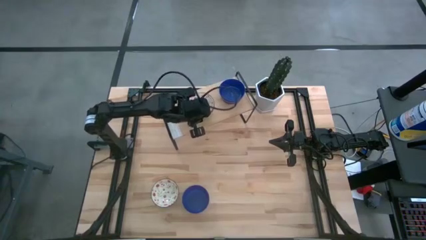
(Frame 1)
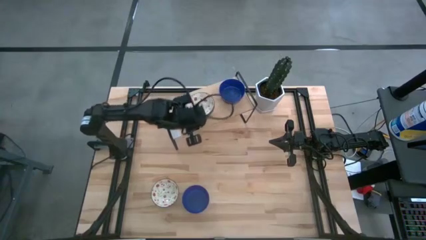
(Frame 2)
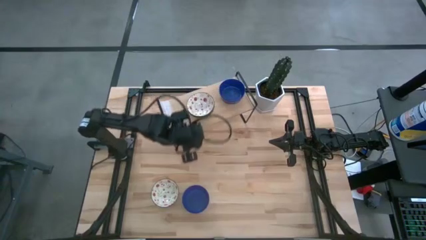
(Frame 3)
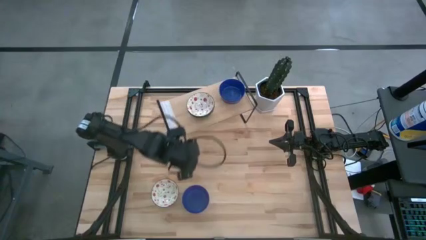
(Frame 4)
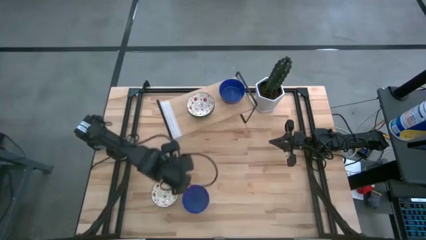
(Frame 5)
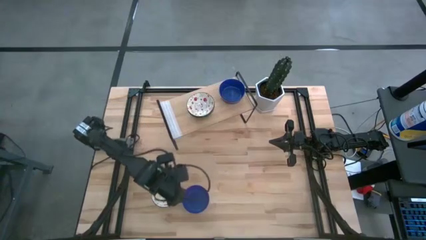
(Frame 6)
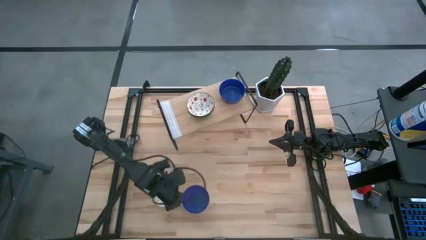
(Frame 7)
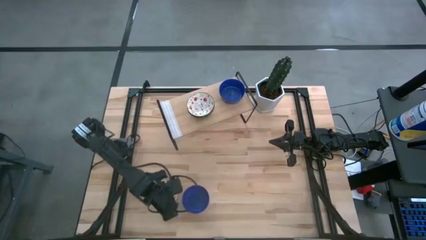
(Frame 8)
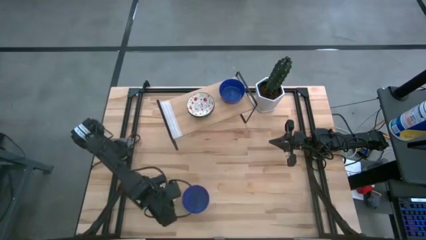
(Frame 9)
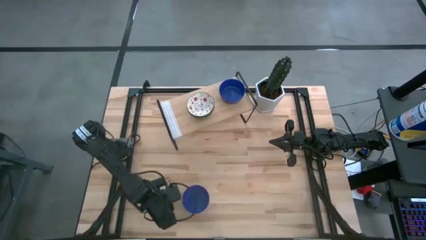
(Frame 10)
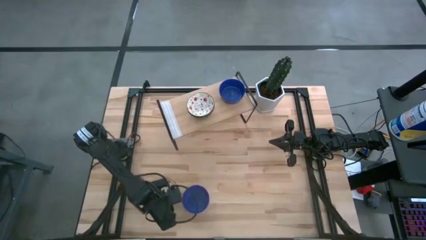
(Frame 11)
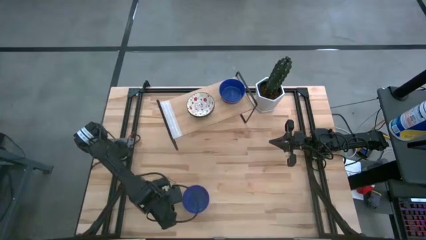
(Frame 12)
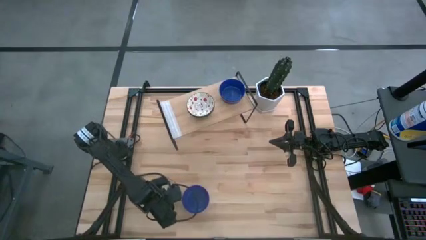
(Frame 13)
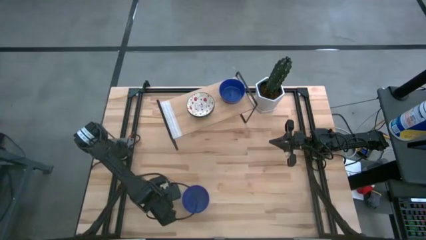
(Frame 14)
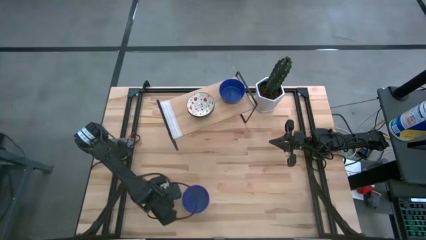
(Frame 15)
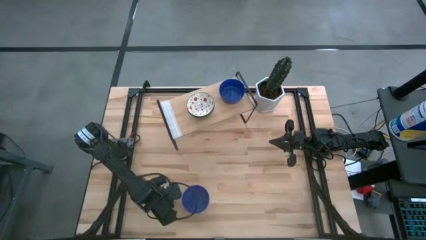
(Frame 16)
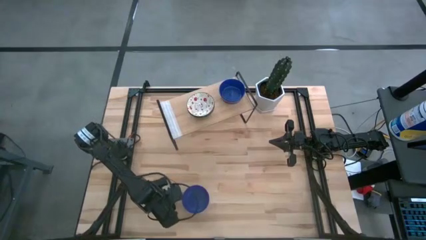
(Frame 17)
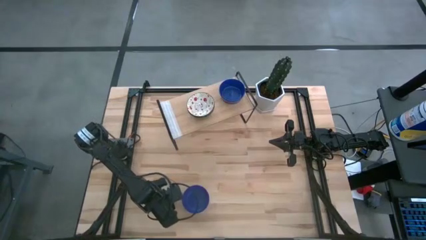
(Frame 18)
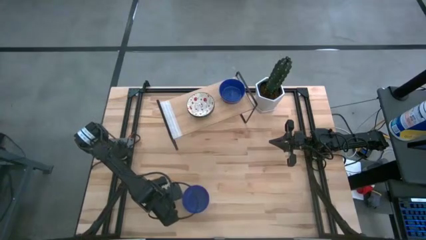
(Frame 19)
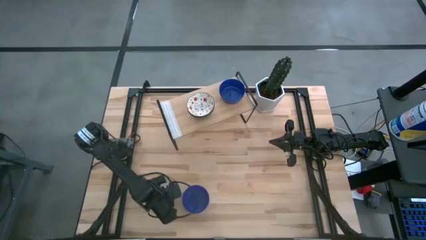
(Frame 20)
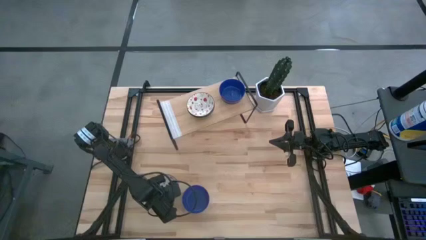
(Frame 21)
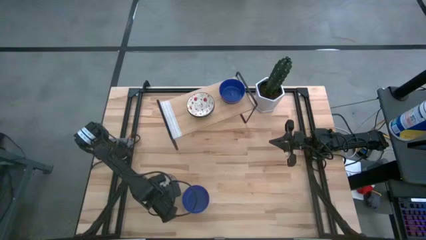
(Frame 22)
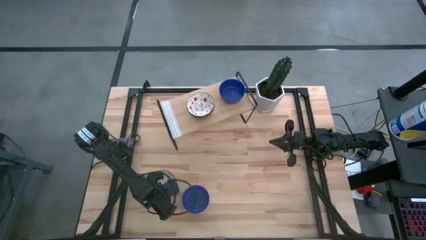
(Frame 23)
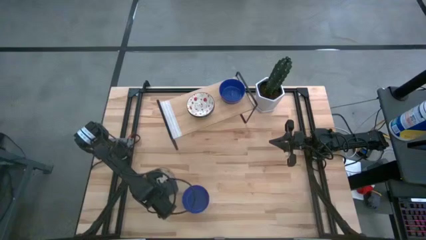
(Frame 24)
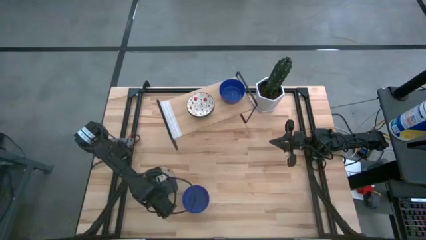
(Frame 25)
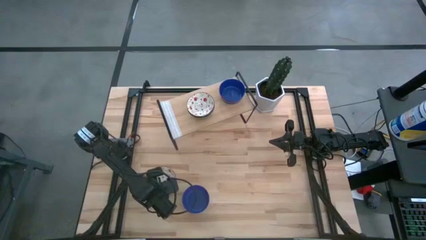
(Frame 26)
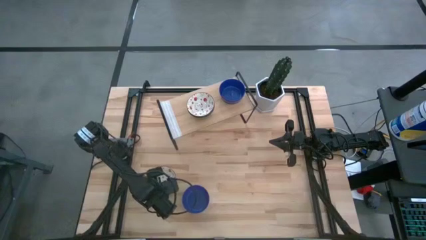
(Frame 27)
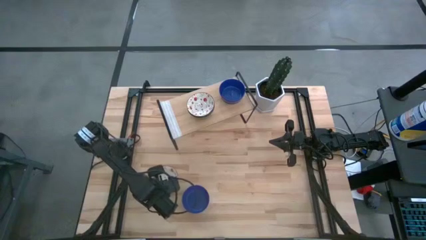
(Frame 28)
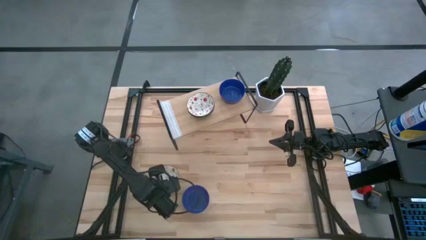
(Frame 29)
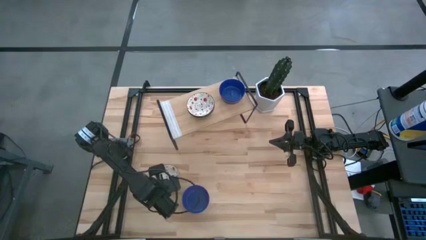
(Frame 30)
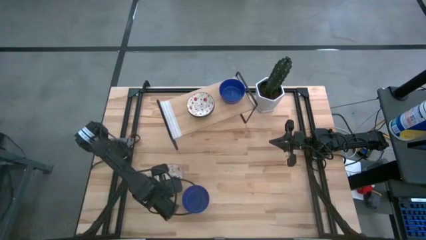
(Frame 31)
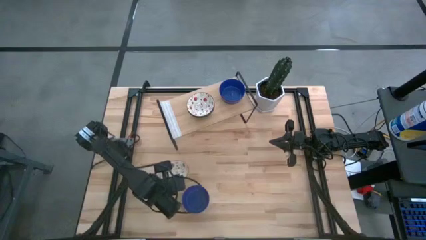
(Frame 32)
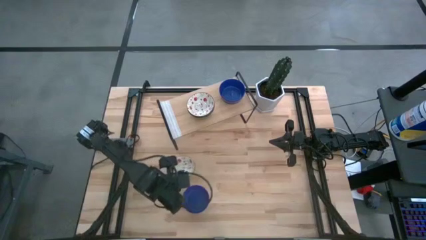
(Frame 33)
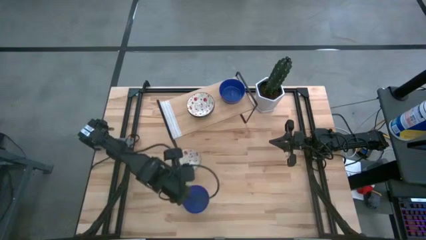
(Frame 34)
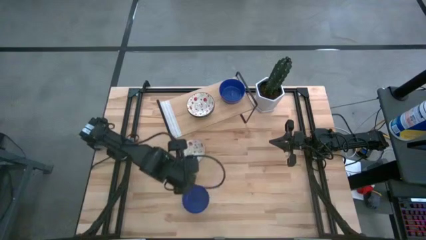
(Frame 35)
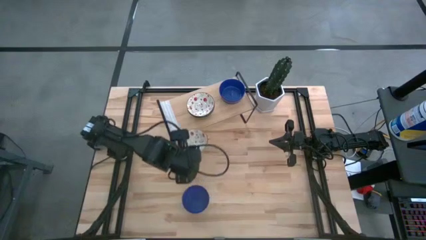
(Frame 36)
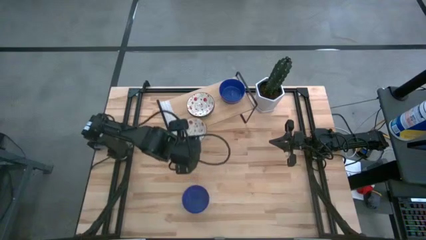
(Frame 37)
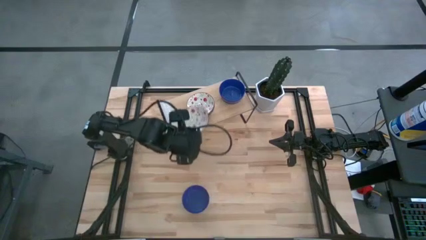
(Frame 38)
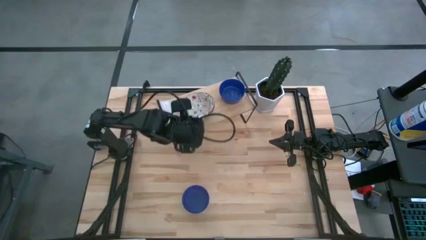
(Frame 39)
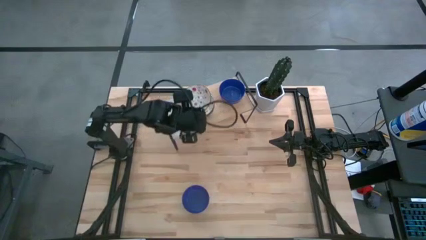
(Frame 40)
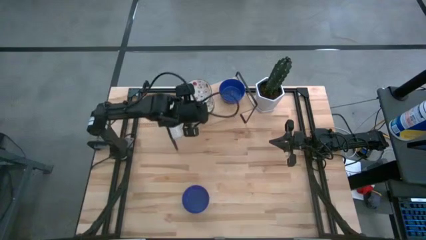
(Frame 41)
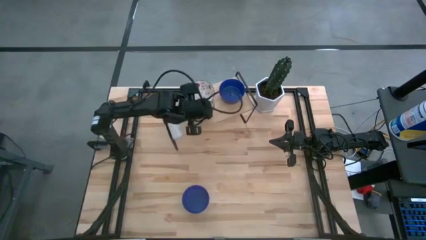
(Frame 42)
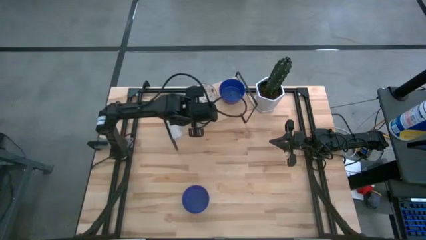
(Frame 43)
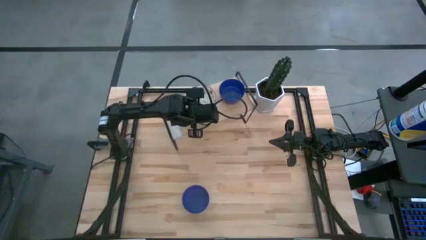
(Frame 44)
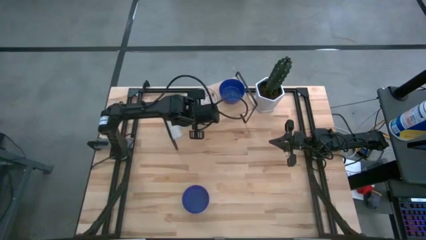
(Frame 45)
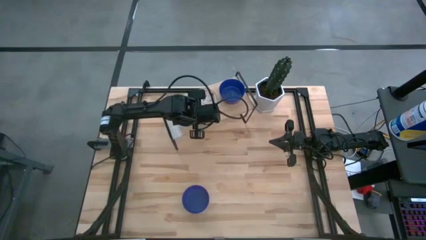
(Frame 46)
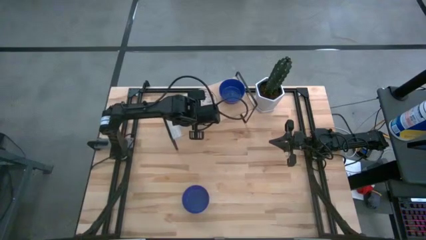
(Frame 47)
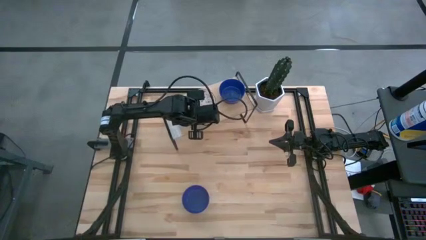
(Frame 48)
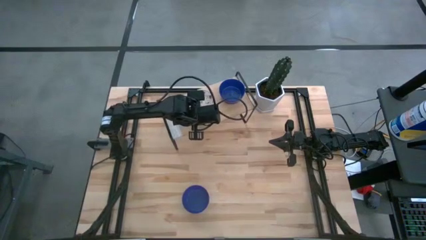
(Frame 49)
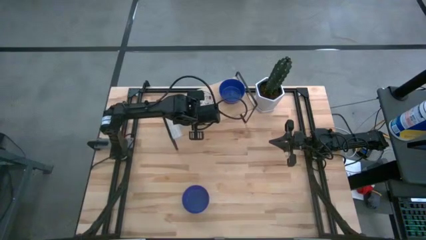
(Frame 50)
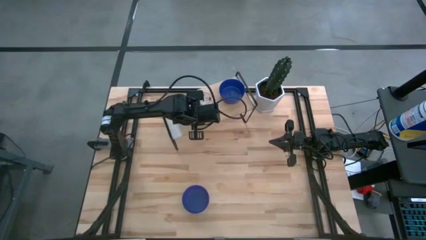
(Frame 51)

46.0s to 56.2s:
Task: Pick & Place Mini bowls
Stack the white patterned bowl on top of the white patterned bowls on the shelf

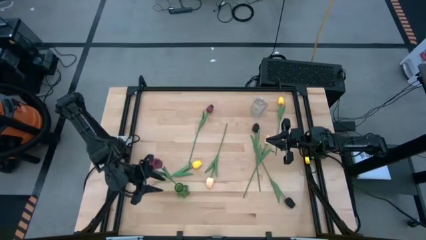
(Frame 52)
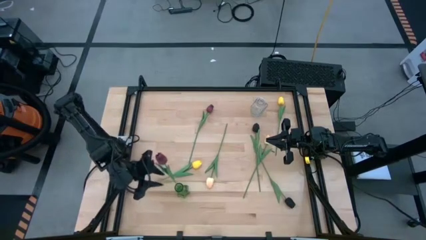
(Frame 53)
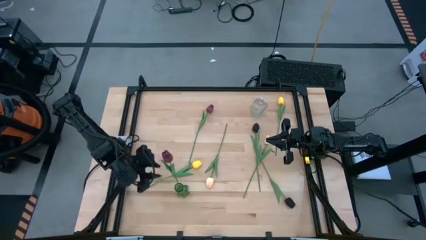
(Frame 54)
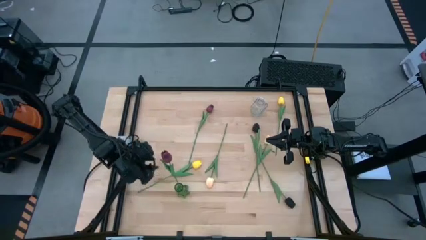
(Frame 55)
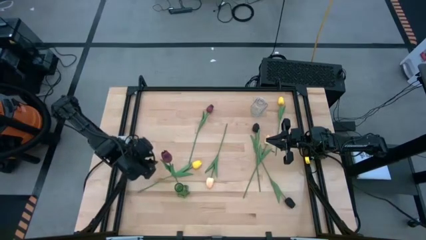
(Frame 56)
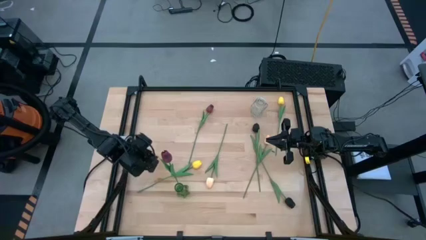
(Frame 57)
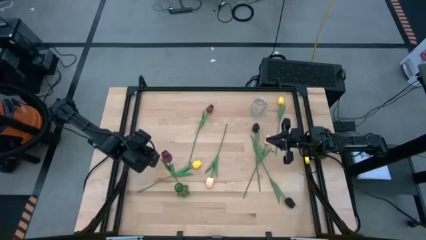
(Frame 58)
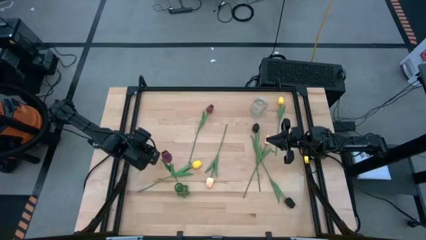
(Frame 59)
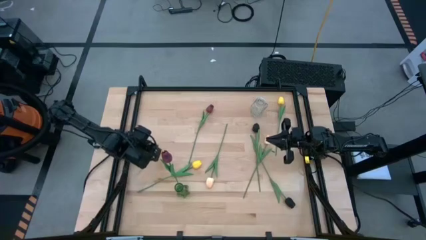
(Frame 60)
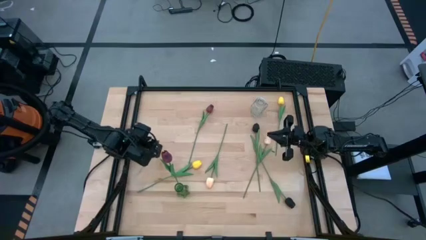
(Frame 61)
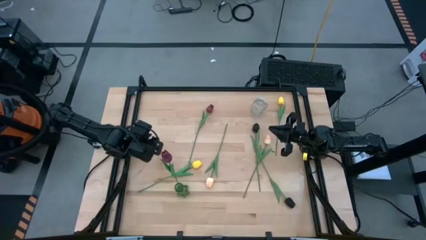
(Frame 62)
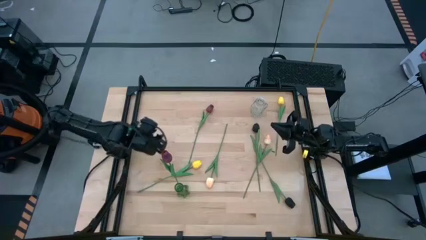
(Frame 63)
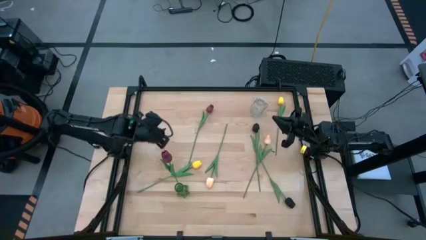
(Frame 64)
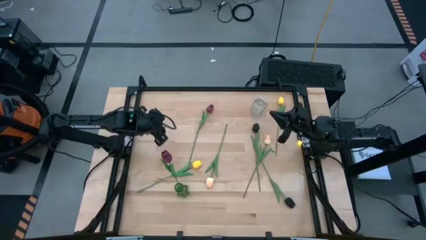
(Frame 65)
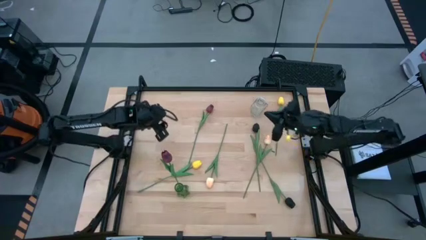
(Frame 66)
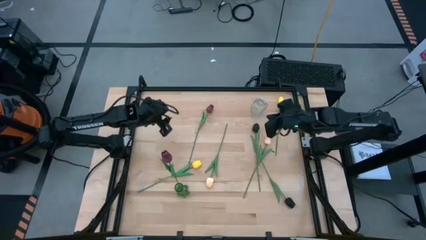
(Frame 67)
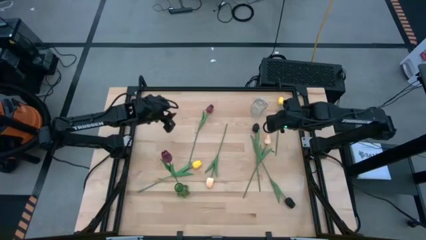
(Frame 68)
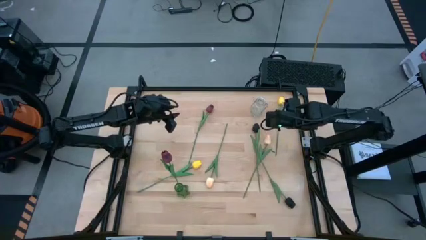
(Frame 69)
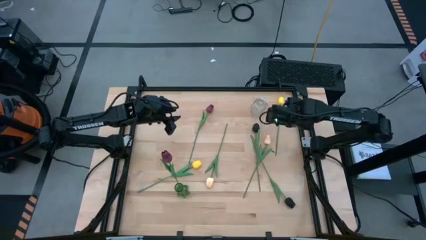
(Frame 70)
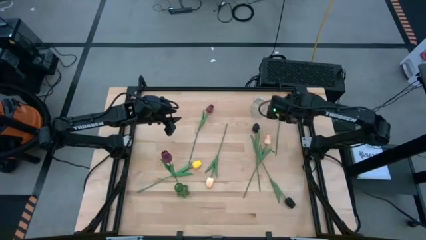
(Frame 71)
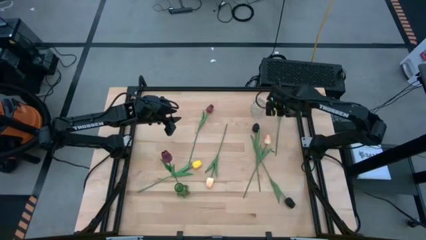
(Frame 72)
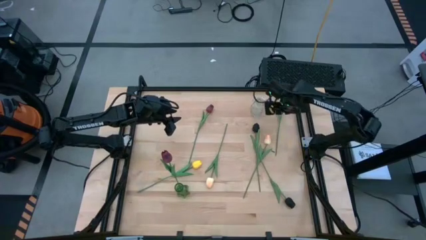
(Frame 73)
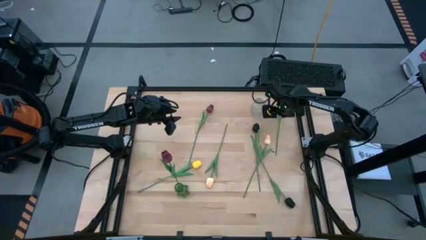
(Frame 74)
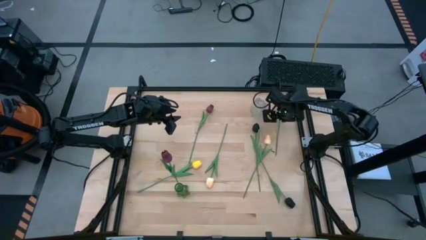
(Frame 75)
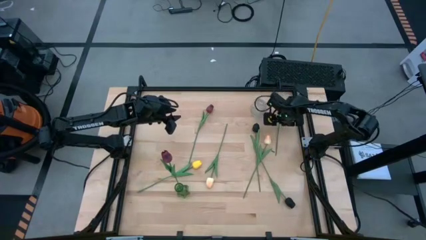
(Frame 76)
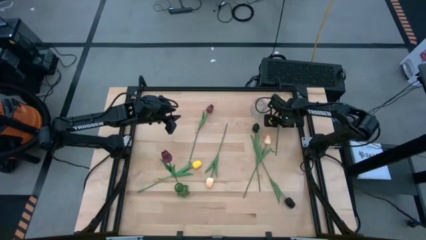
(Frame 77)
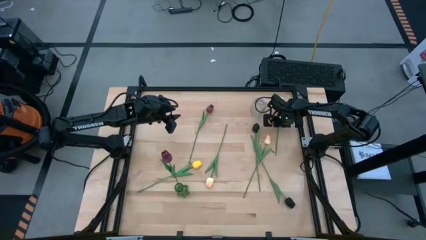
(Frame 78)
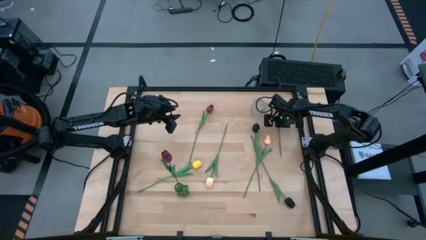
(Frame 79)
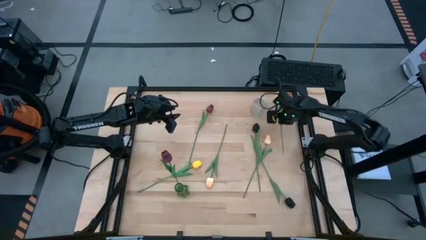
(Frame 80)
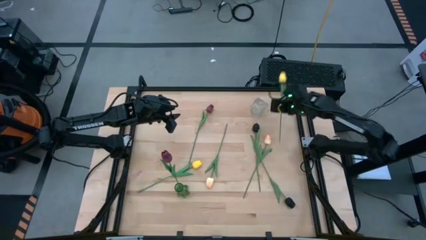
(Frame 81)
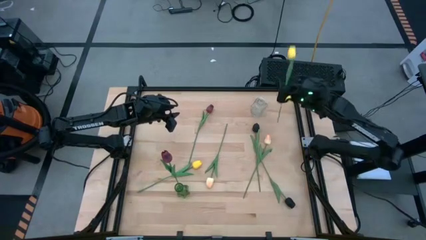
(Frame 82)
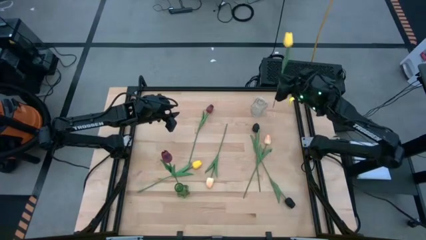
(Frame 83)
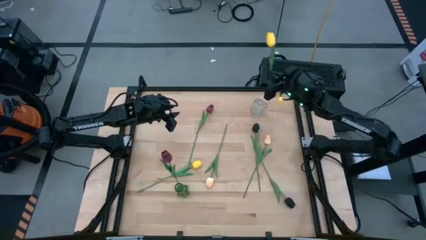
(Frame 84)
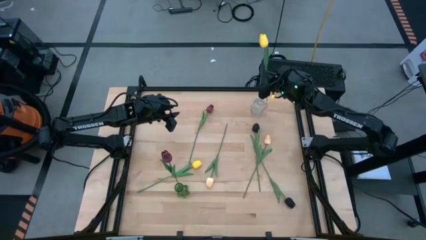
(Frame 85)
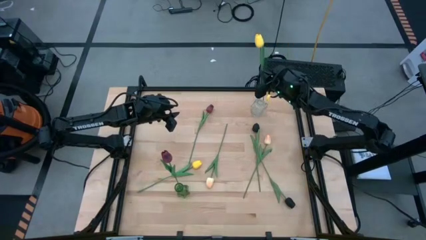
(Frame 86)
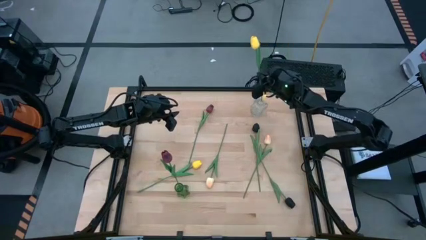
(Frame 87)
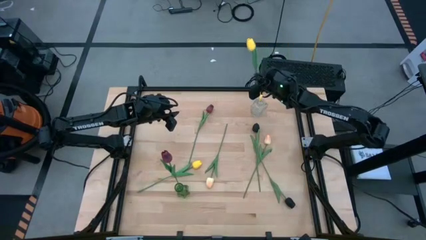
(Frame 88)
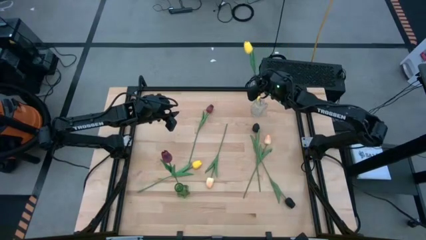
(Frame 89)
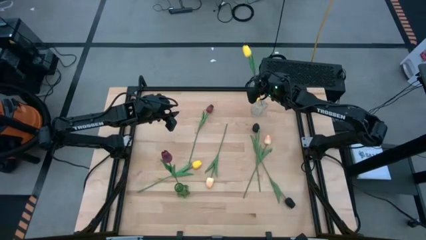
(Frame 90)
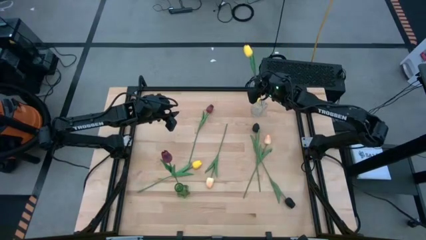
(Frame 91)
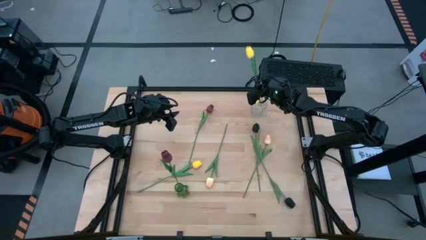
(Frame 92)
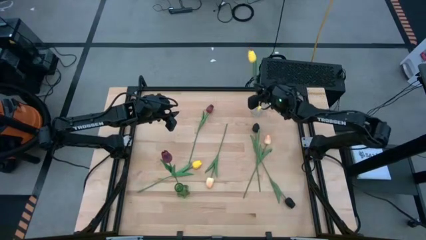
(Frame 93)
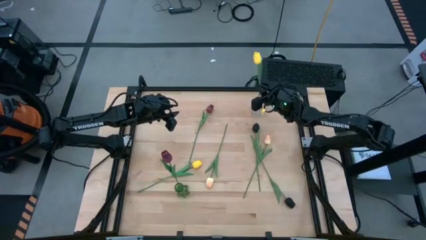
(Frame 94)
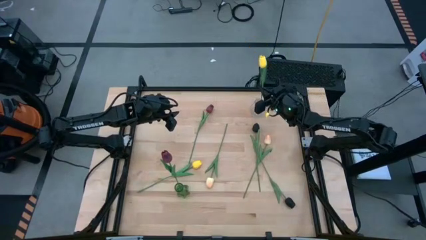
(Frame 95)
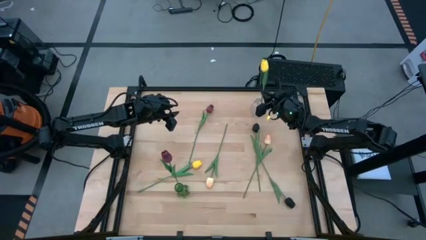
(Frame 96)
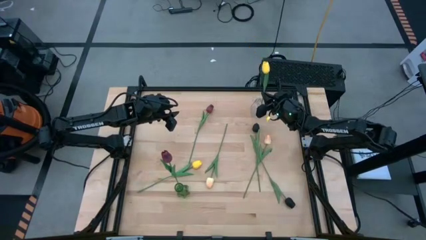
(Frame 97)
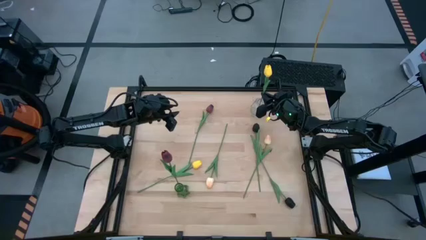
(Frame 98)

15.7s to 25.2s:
Task: Sort flowers into vase by color
Put the top yellow flower into the vase
